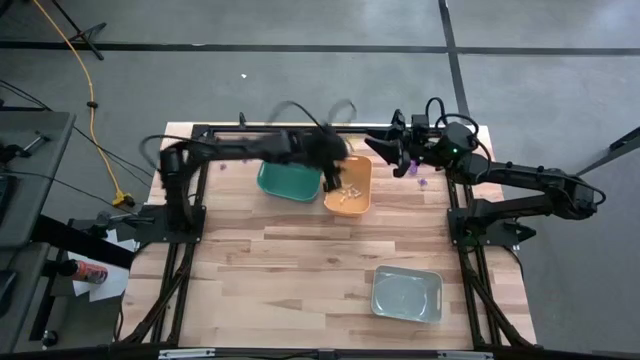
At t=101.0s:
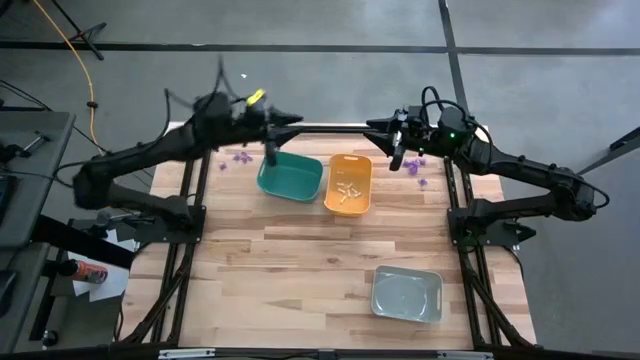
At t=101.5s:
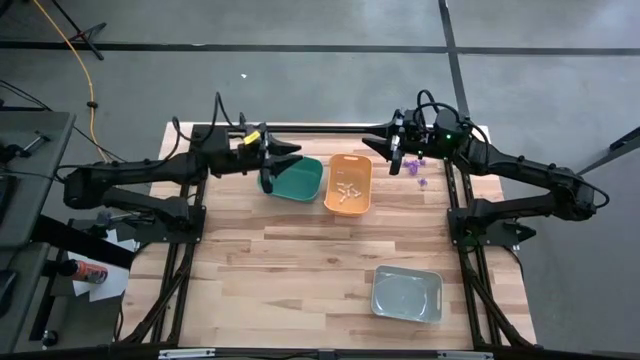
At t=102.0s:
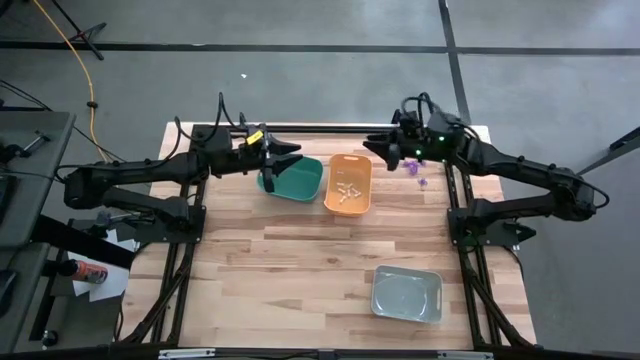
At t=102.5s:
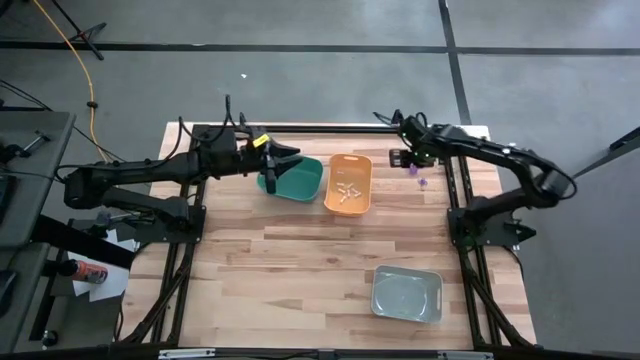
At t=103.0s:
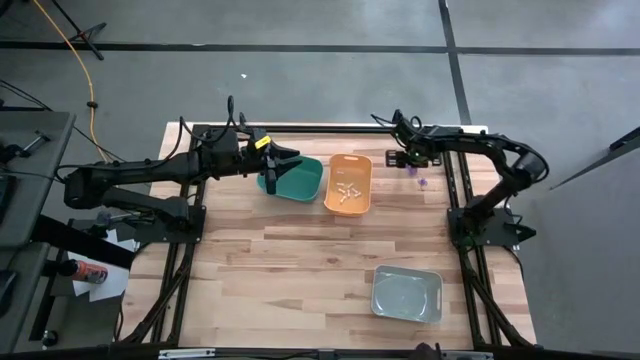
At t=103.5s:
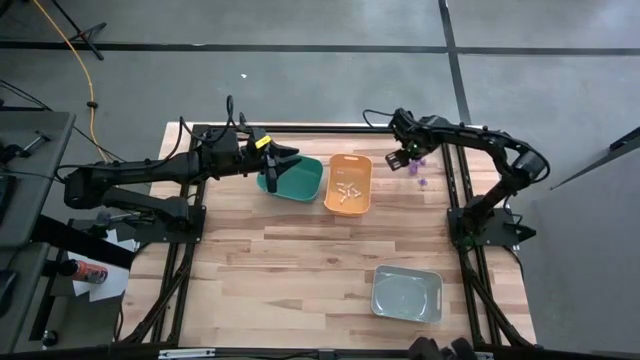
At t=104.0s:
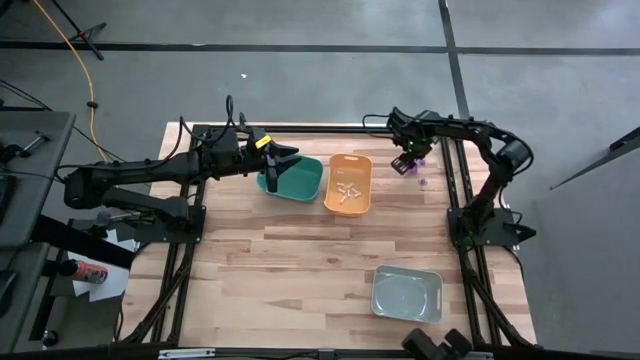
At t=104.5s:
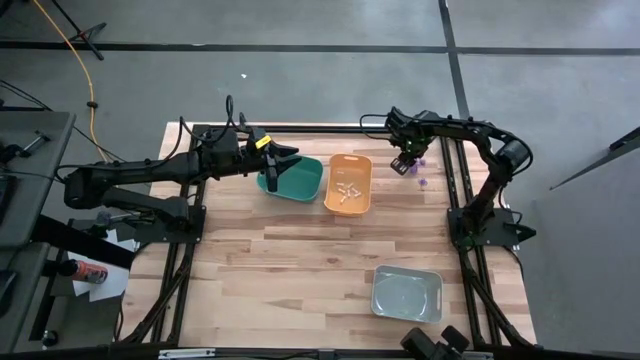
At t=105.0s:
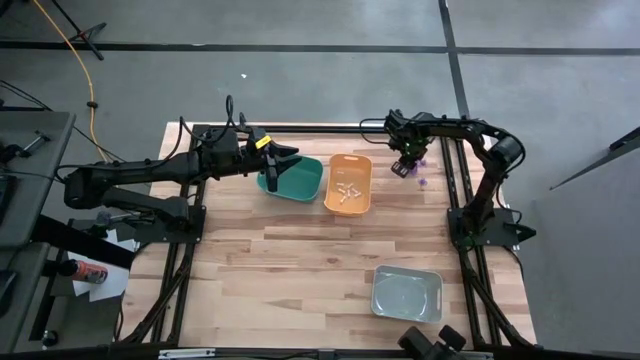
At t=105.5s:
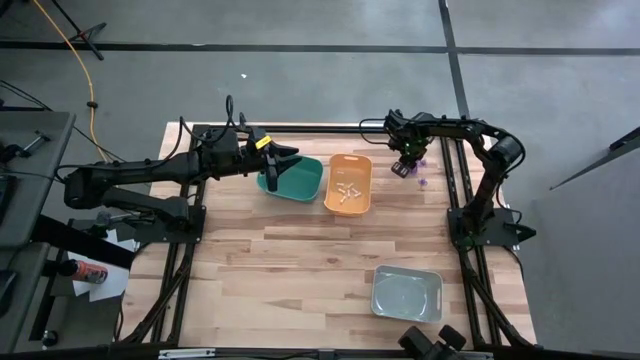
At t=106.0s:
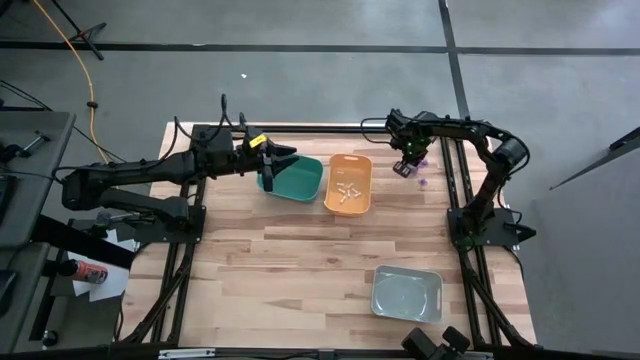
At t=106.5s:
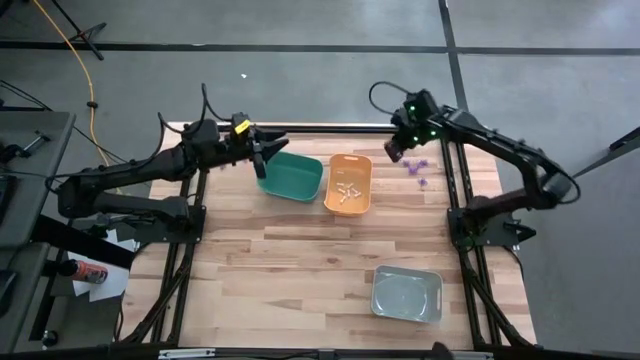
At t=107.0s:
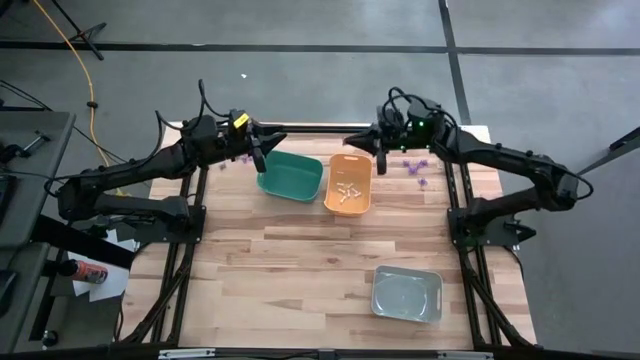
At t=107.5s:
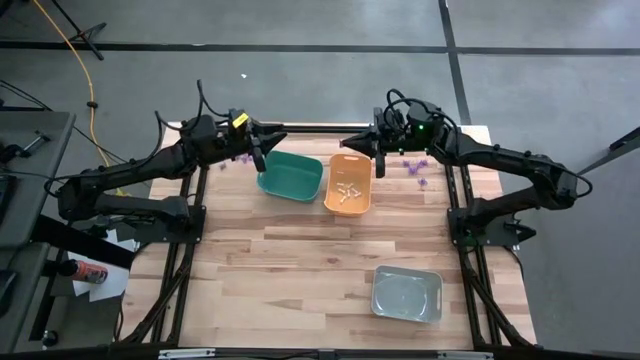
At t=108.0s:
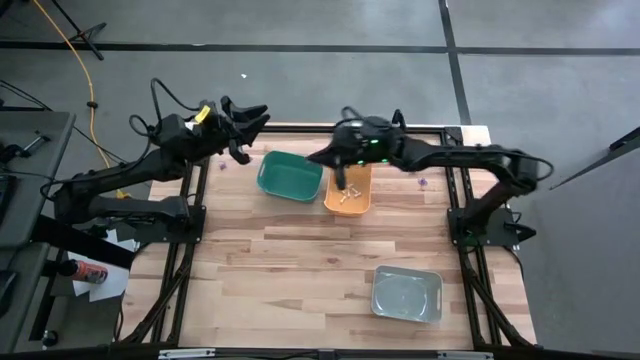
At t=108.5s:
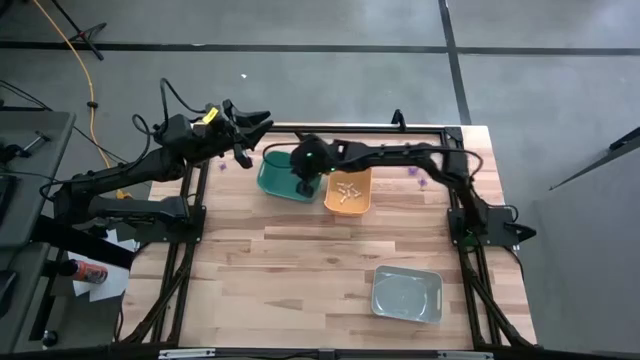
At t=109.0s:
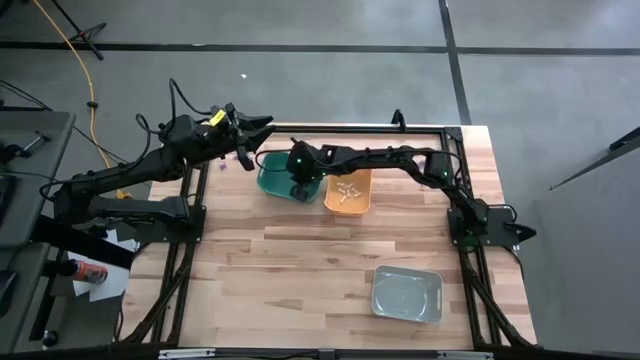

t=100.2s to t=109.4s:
Task: Sort Halloween decoration
Put the violet witch hut toy into the green bin

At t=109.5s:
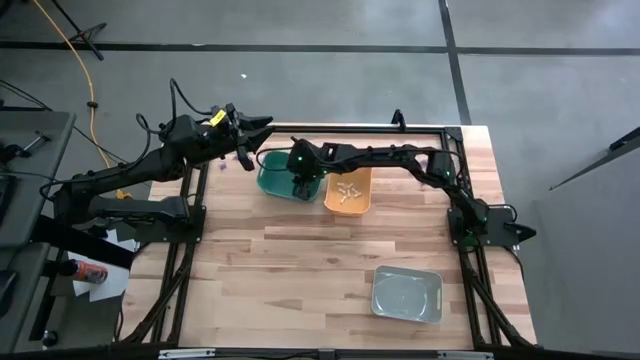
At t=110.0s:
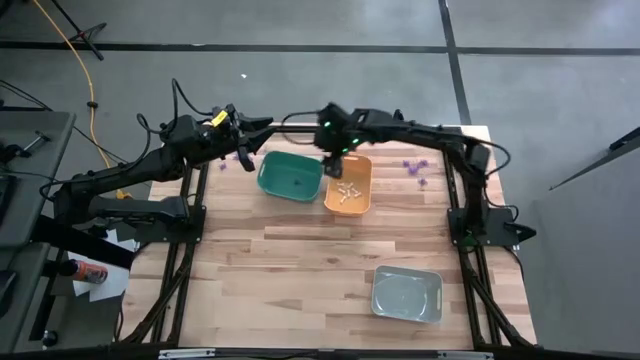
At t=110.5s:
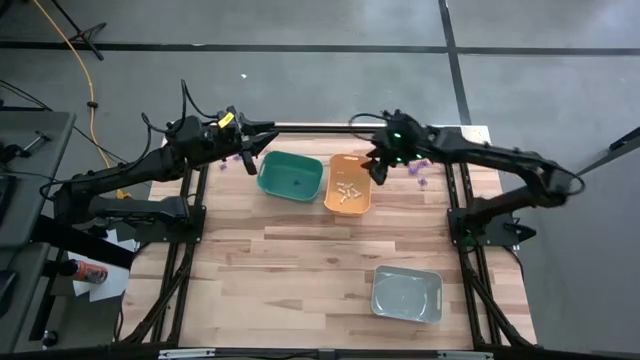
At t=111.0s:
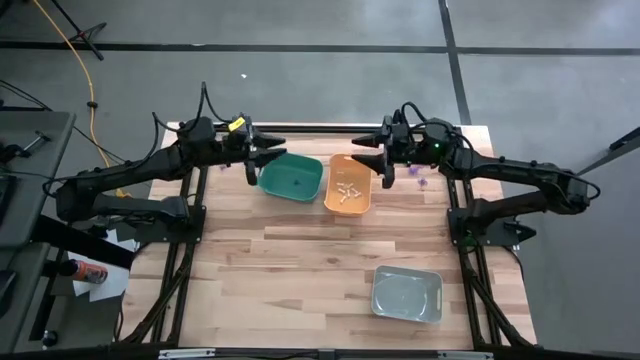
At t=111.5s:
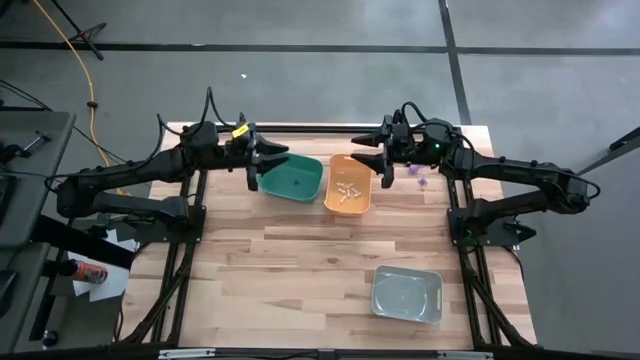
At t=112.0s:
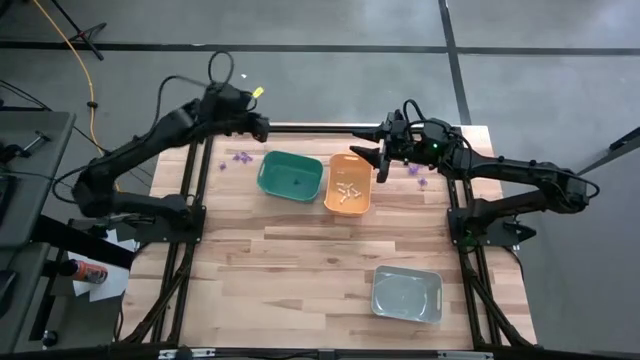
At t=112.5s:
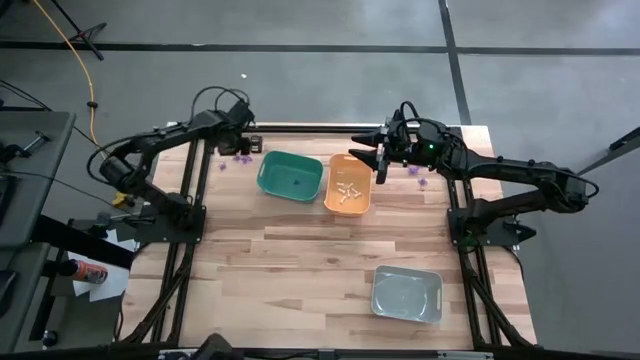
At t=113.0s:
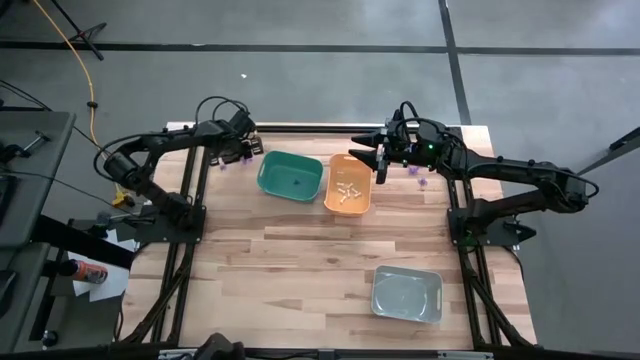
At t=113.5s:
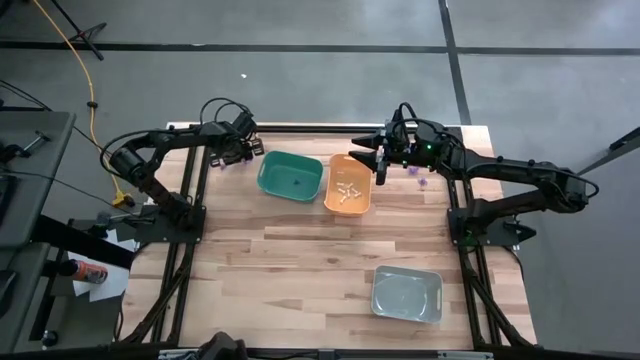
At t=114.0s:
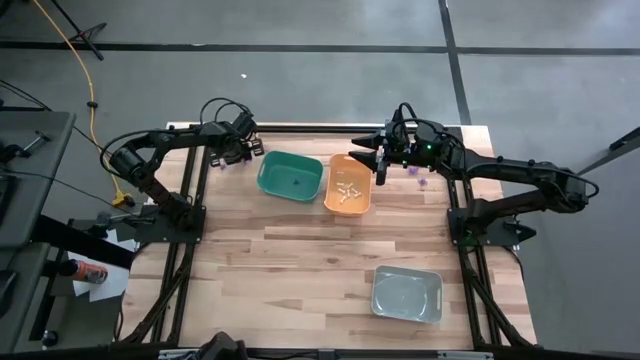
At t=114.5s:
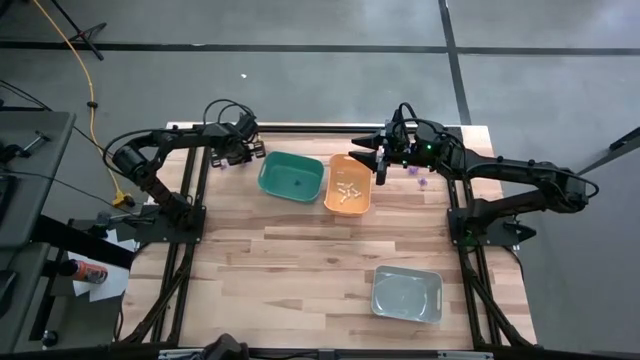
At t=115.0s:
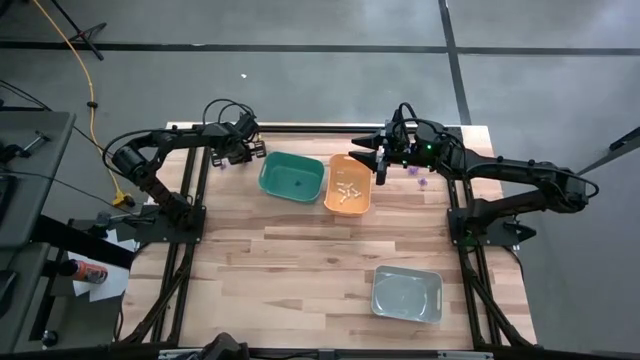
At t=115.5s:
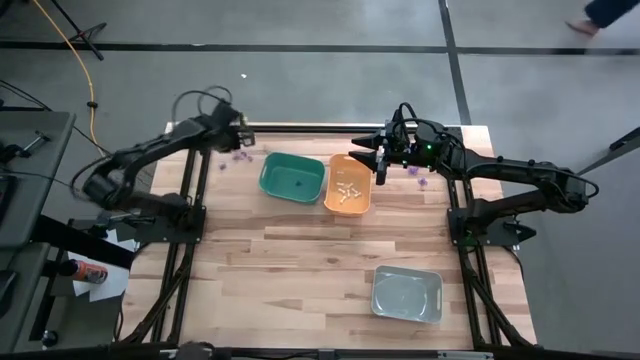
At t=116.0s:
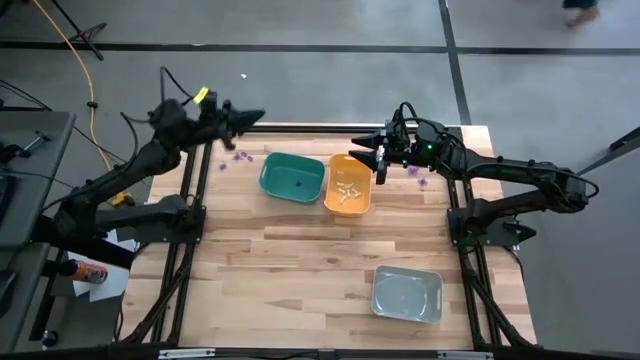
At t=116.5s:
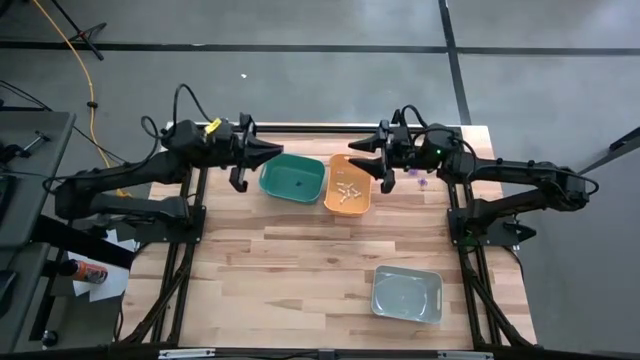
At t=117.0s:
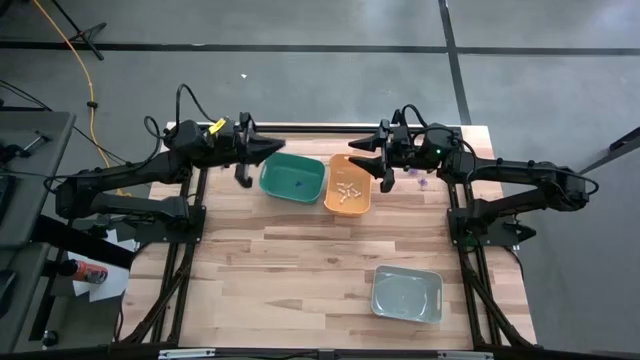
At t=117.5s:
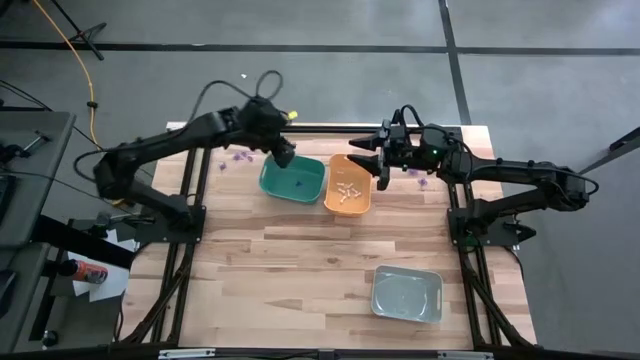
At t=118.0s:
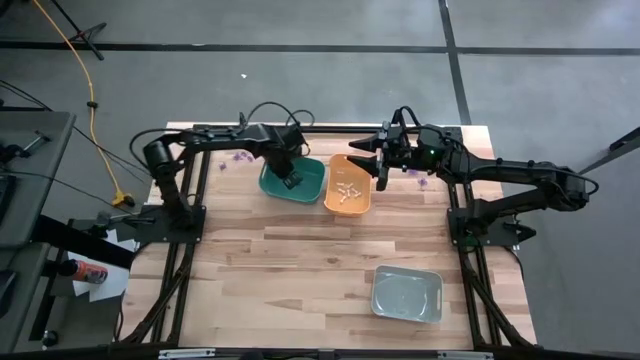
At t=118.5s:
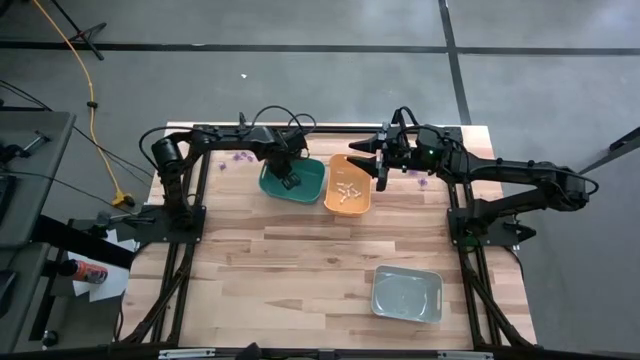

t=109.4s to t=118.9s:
Put the violet witch hut toy into the green bin

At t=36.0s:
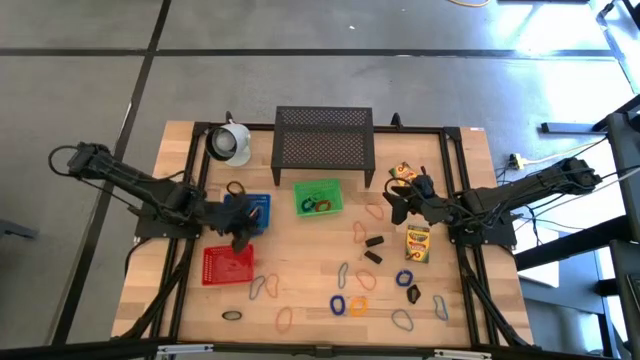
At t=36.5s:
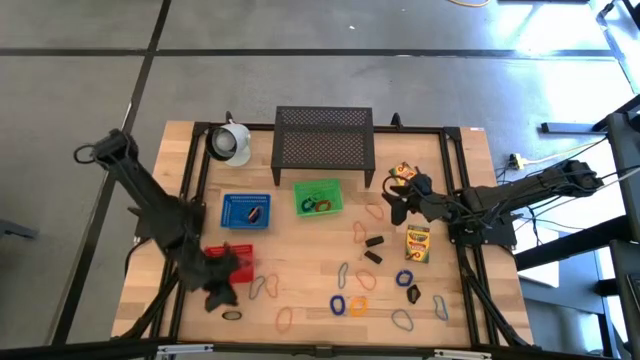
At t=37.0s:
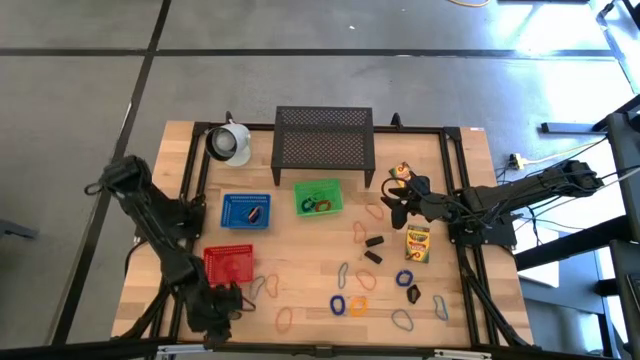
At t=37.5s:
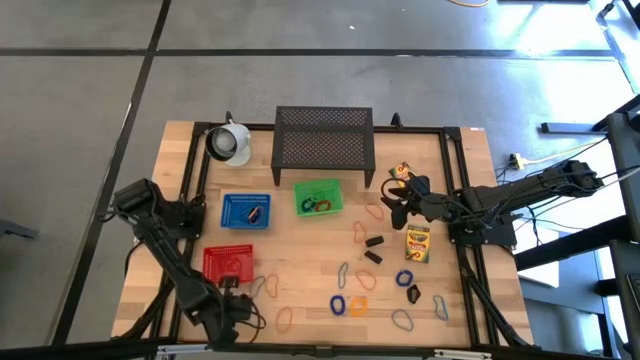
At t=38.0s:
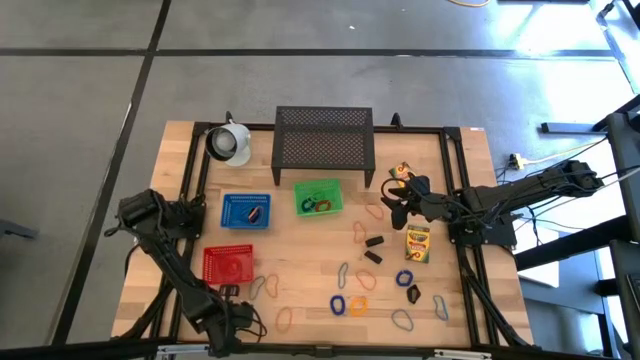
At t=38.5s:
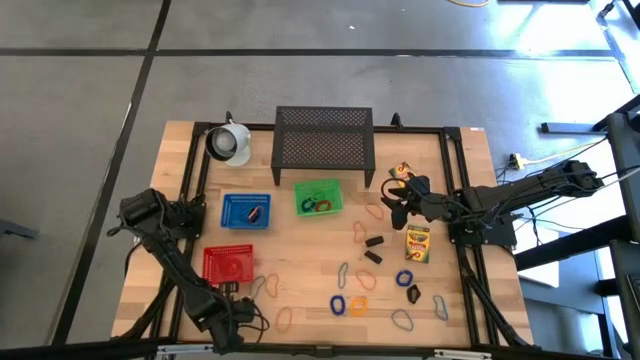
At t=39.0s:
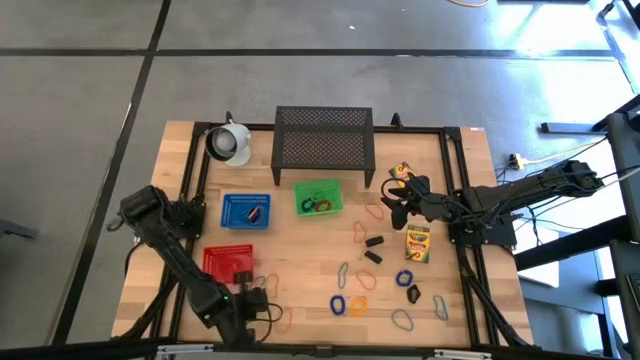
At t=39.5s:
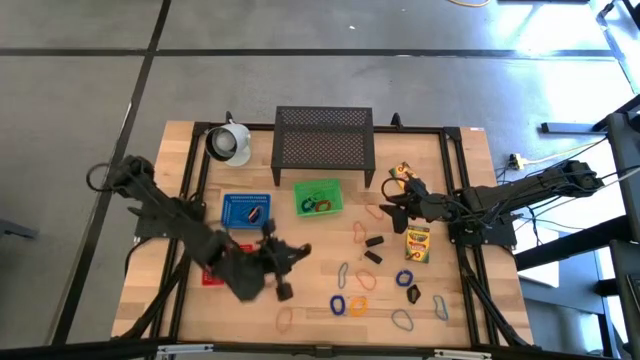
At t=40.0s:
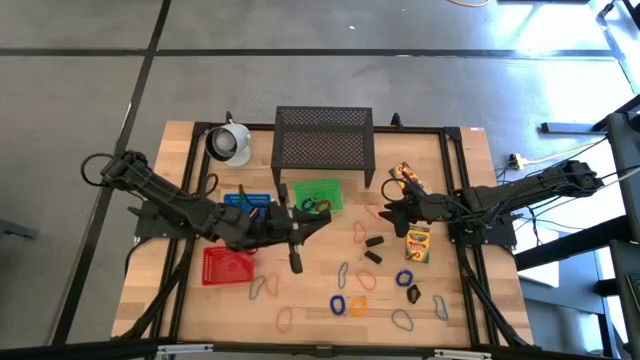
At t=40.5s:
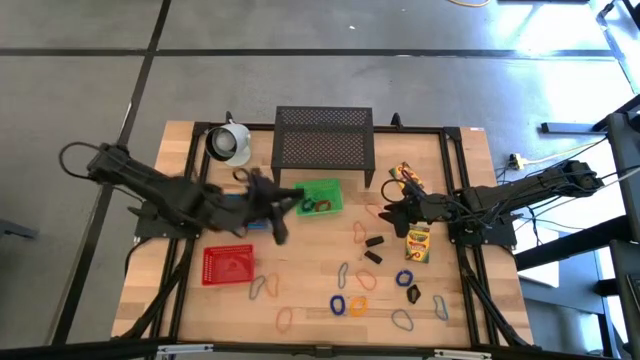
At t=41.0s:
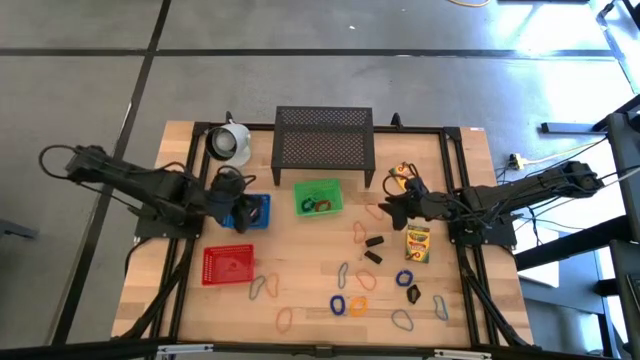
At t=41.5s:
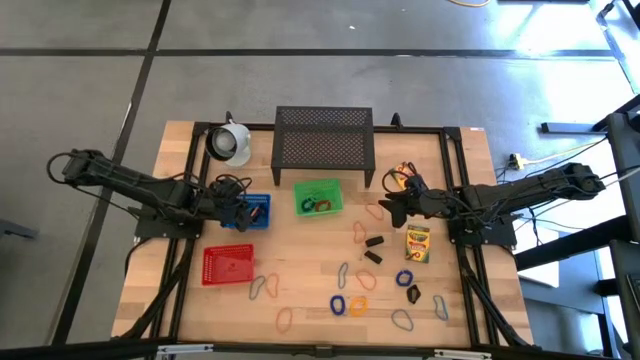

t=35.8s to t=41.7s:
Task: Pick & Place Office Desk Supplies
Put the black rubber band into the blue bin
